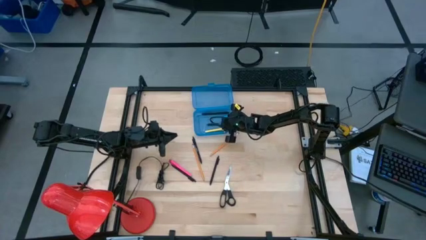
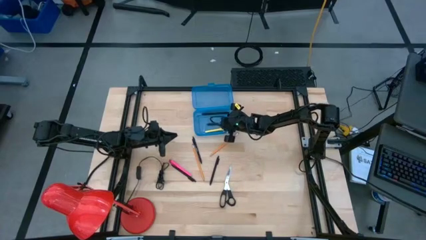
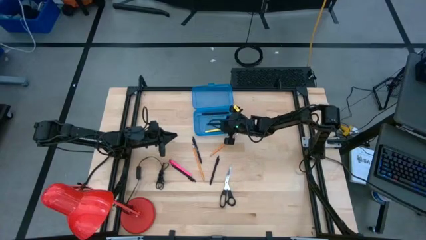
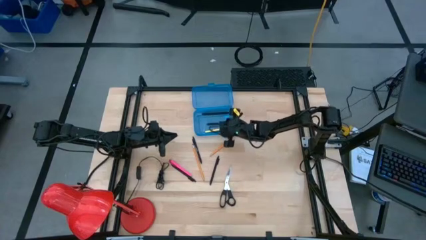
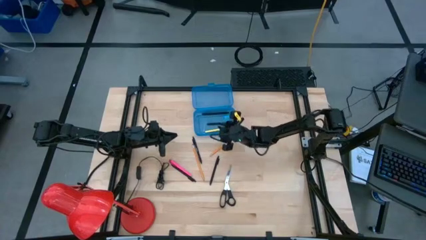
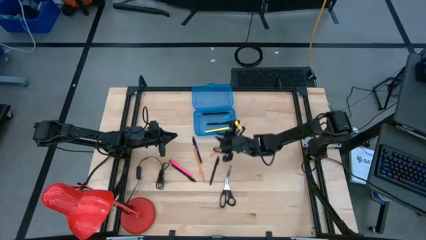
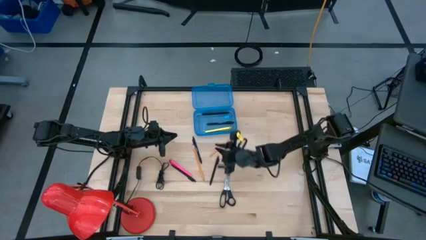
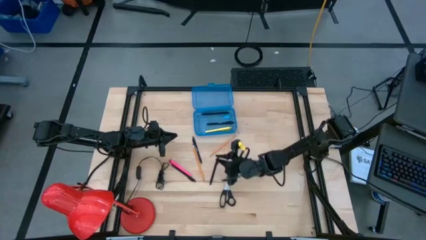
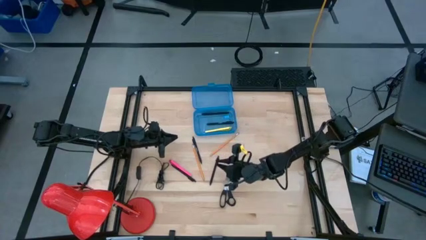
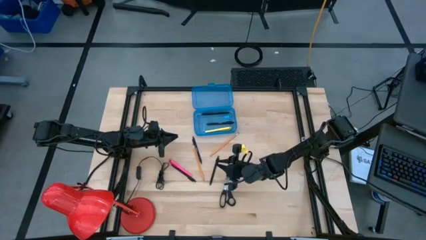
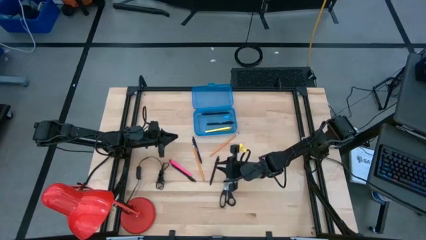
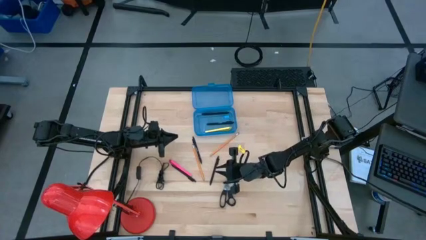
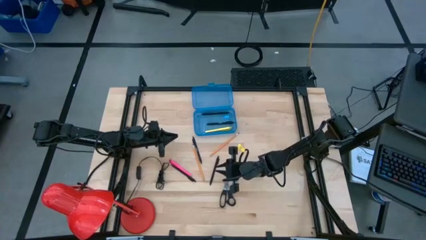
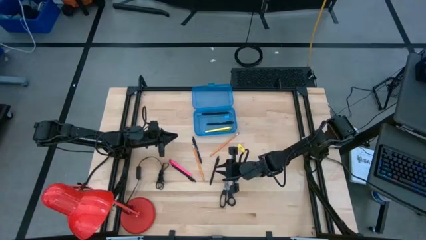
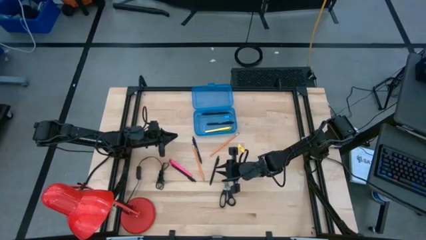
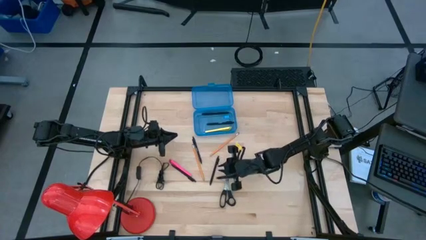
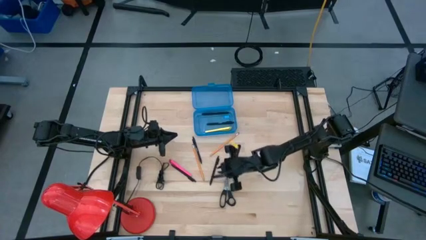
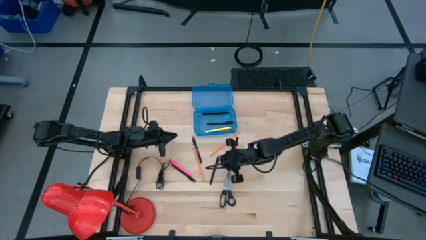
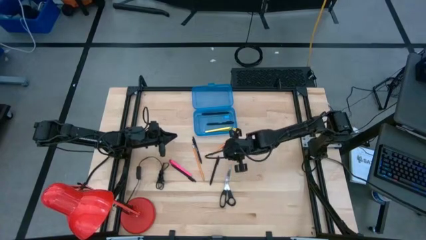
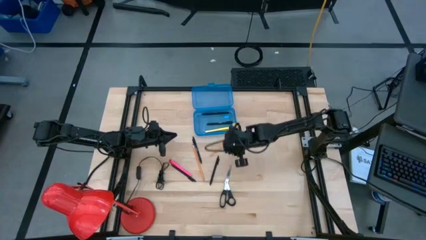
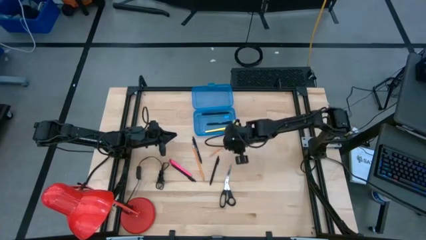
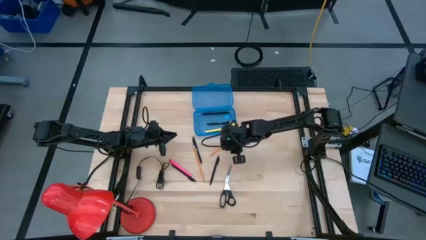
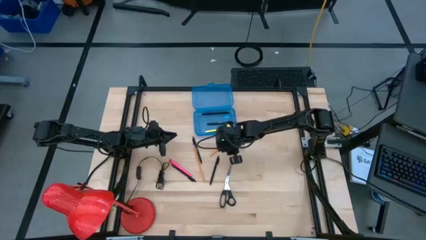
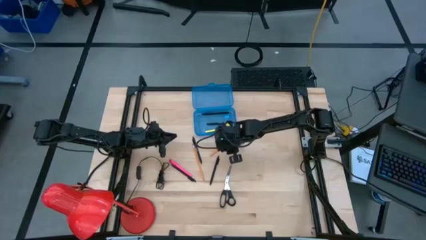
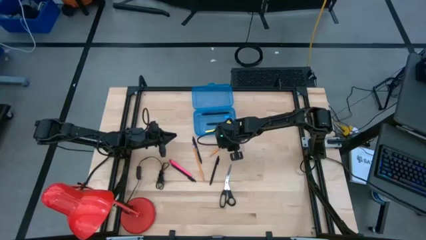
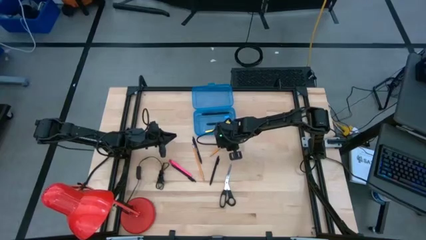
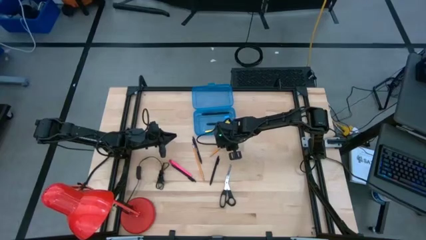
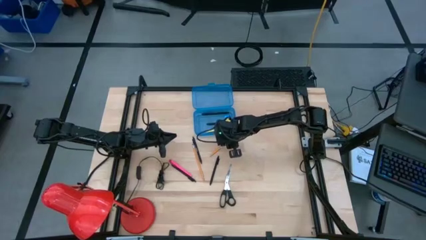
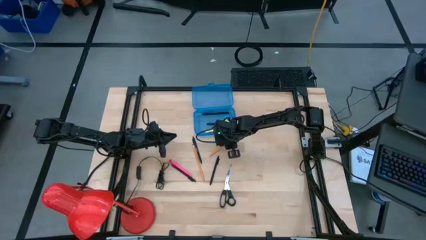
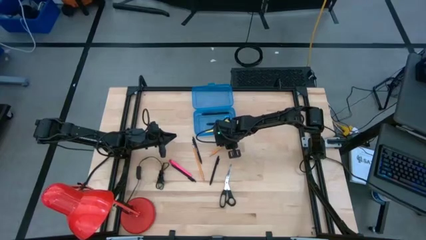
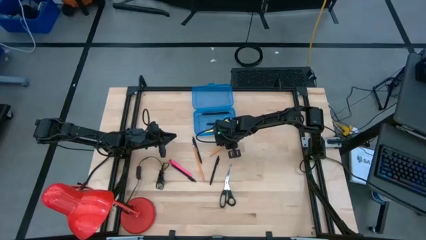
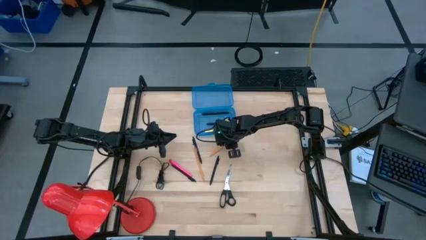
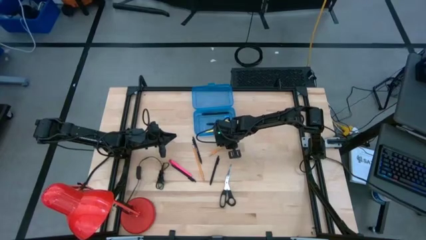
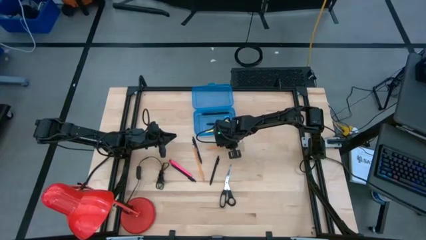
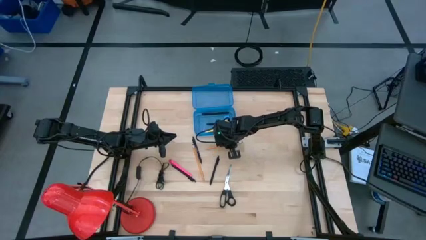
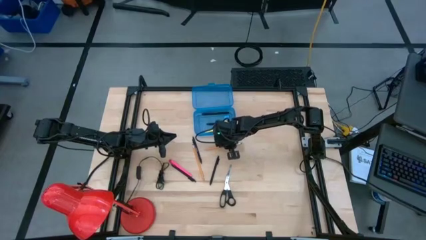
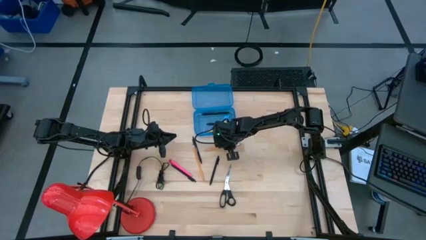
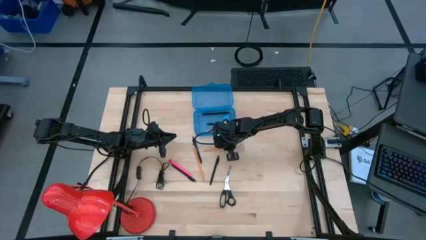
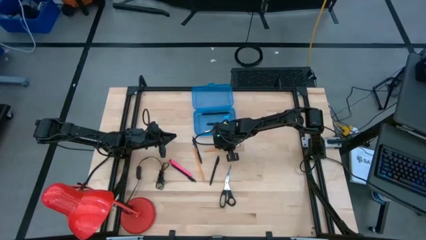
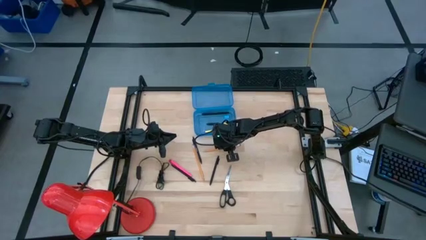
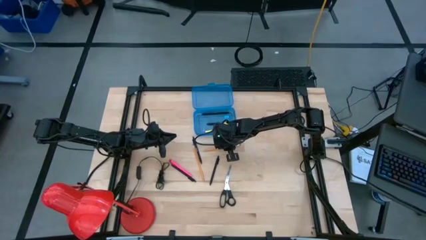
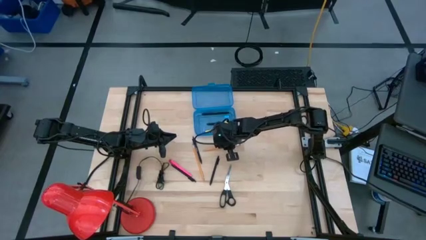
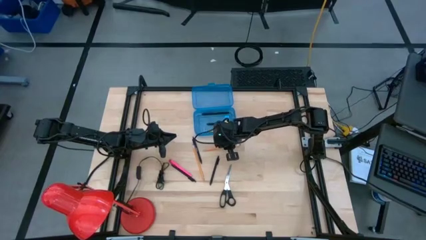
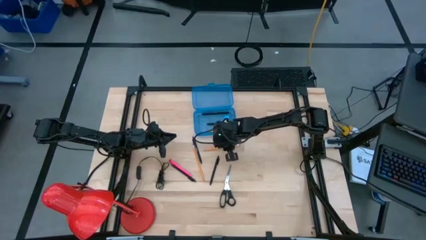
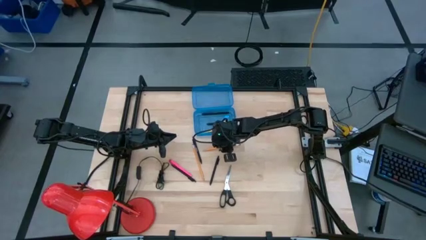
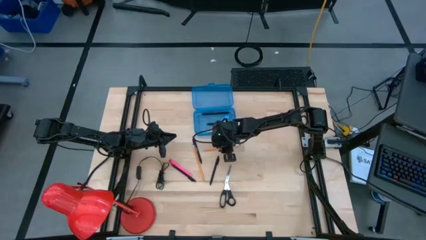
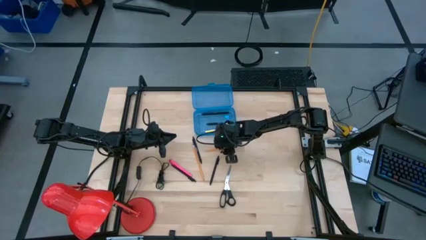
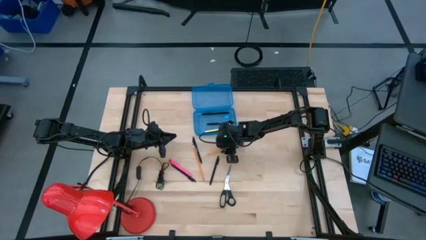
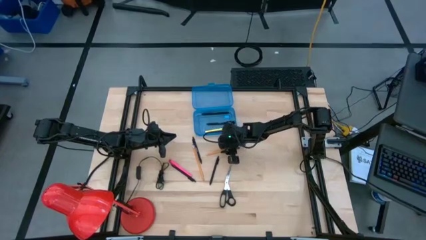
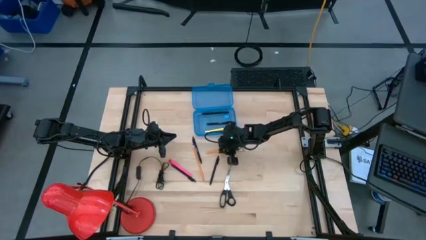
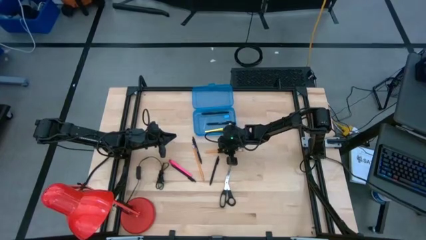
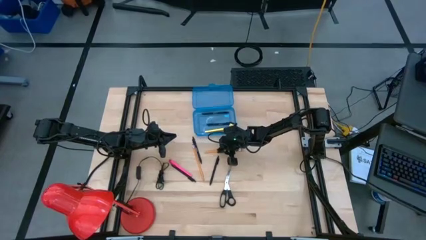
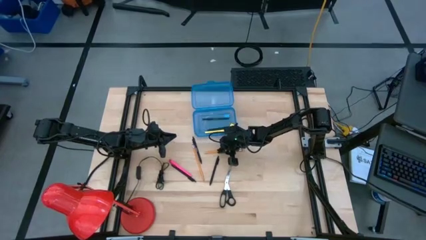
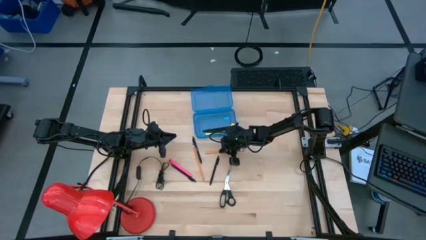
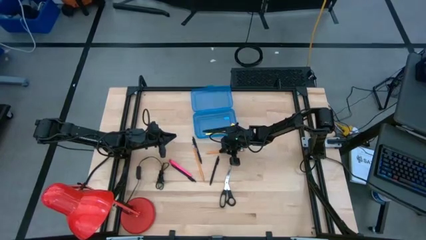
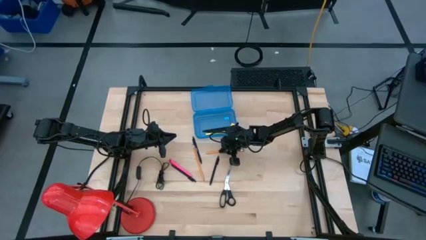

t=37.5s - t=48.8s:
Task: Pick & place school supplies into a supply box
Put the top orange pencil into the blue supply box

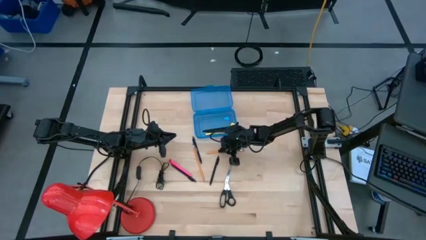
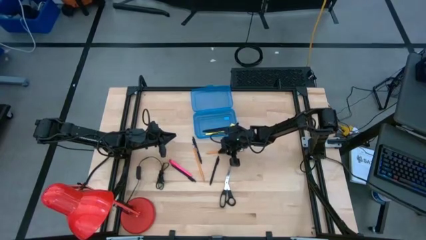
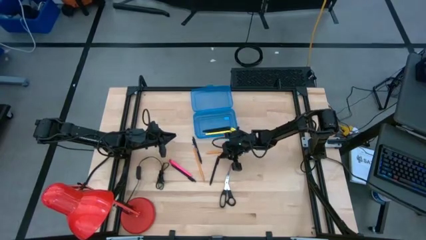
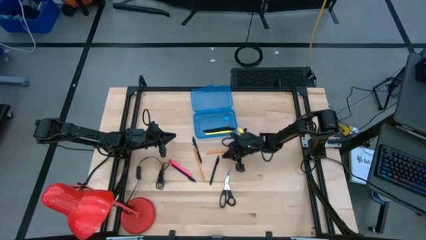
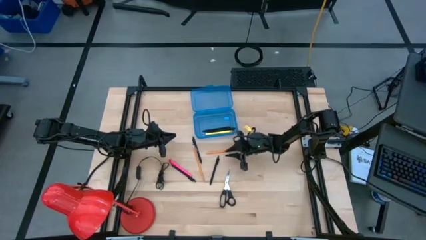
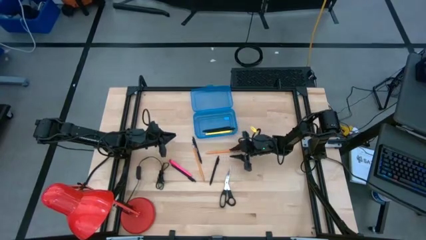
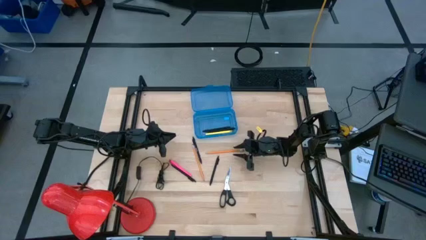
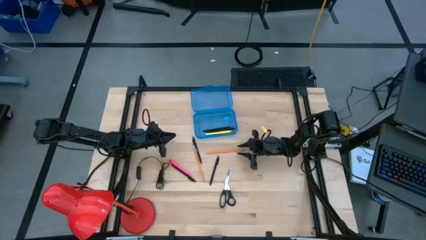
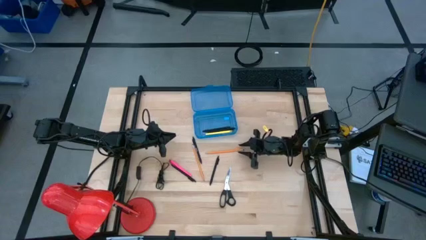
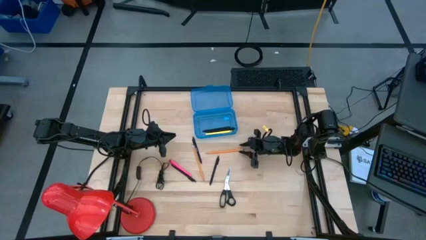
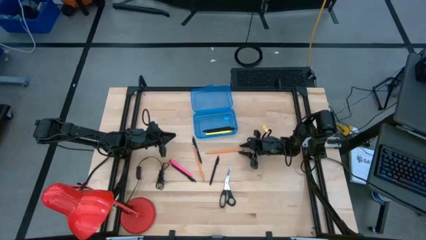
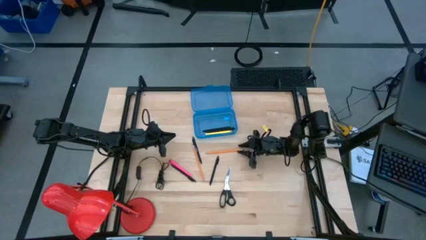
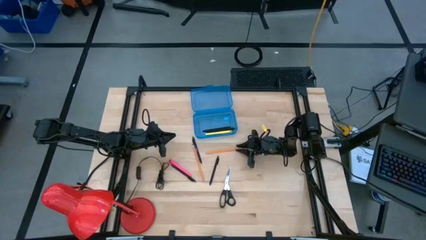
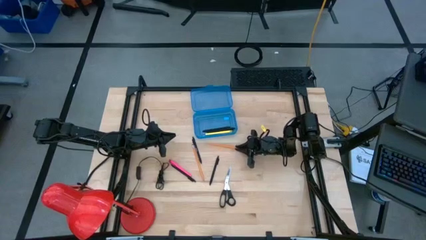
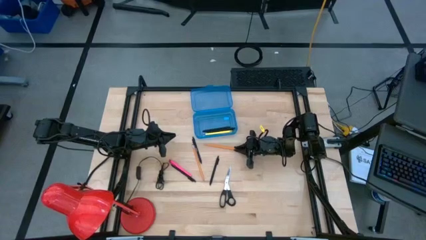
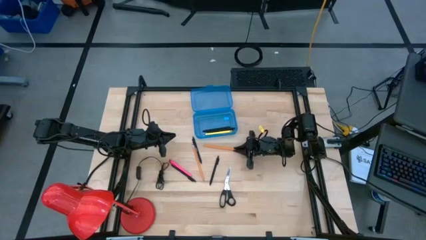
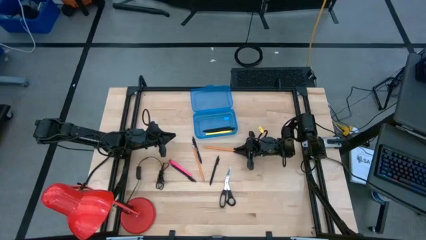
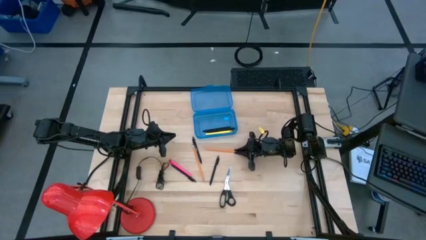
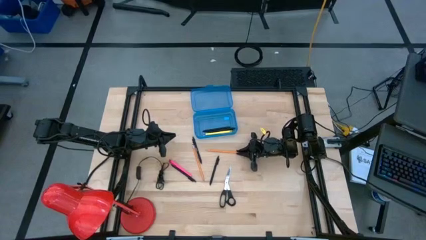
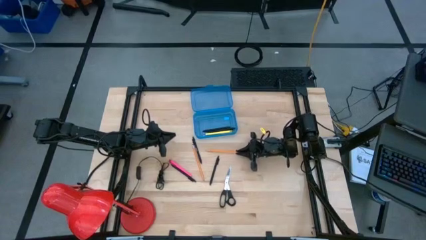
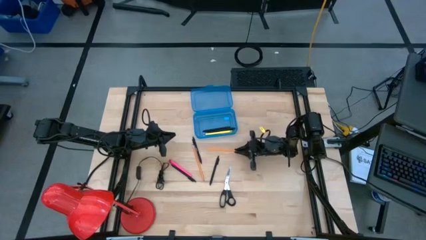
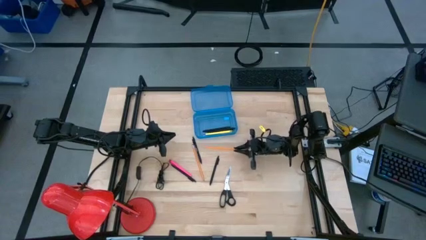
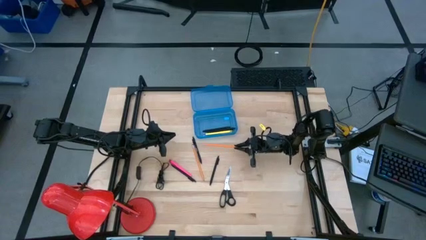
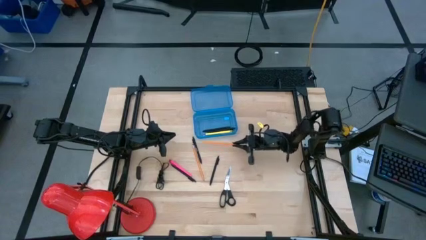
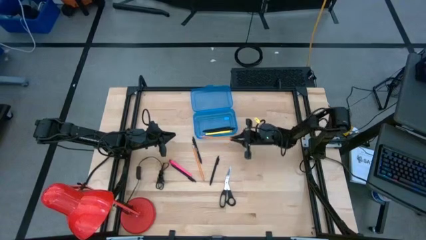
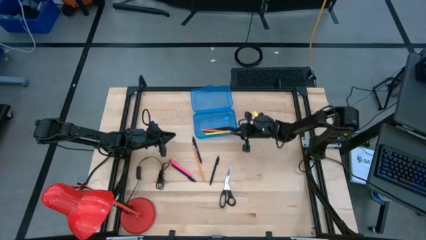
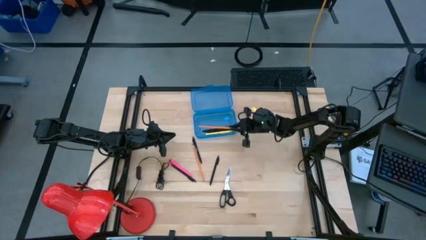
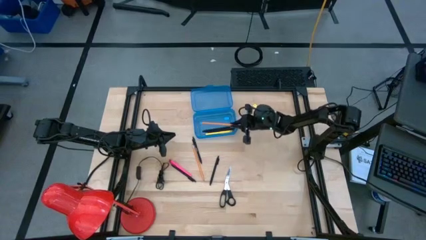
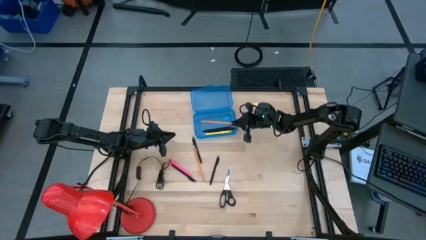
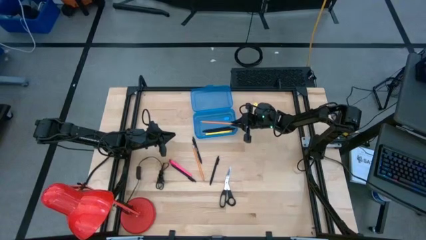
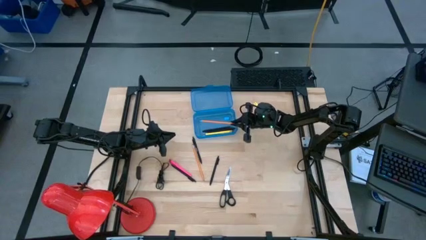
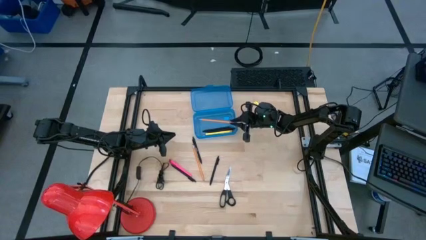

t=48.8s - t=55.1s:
Put the top orange pencil into the blue supply box
